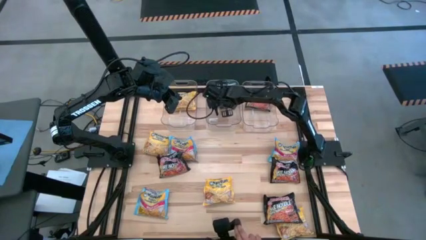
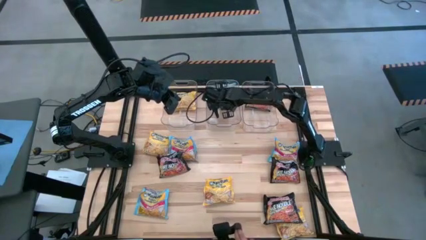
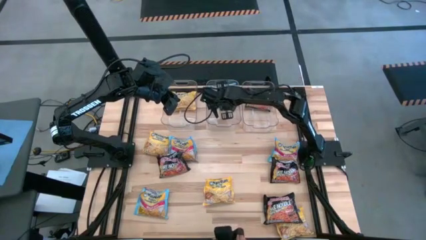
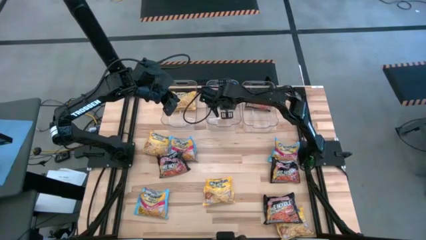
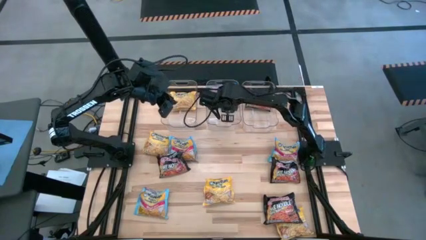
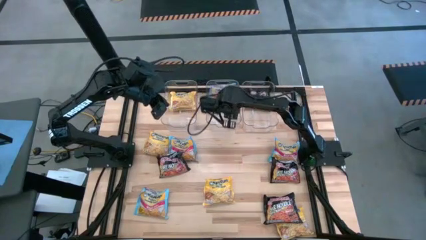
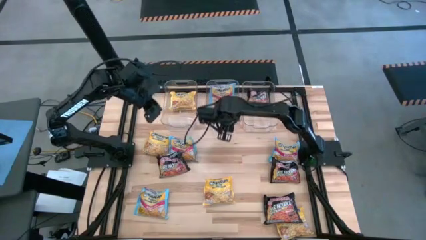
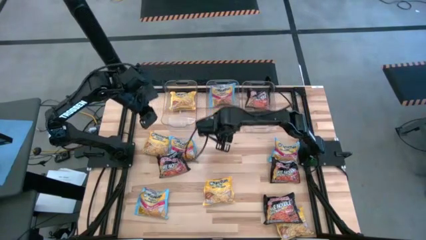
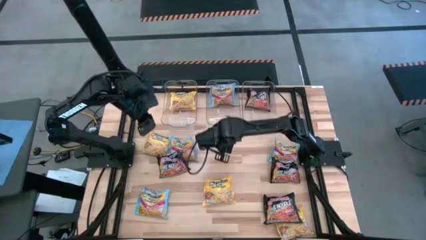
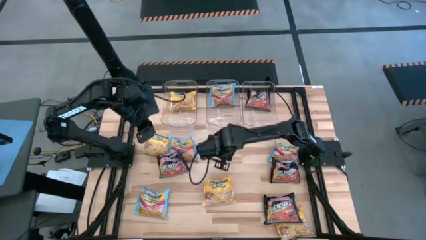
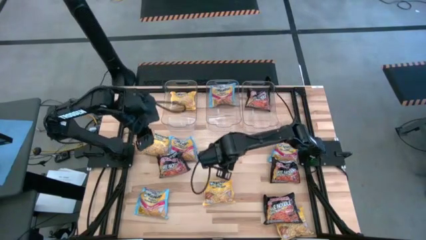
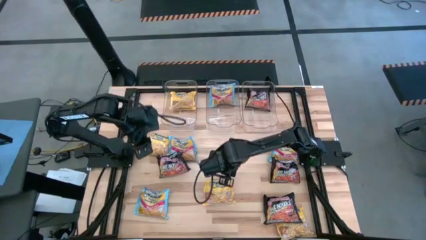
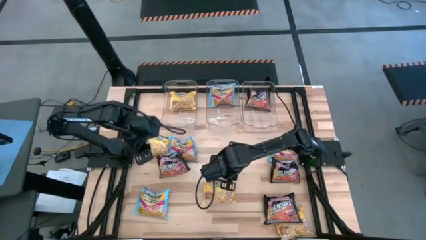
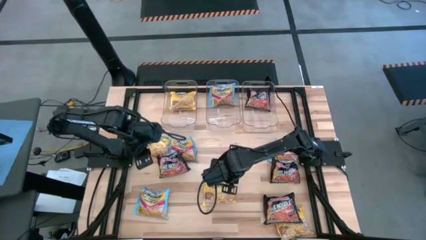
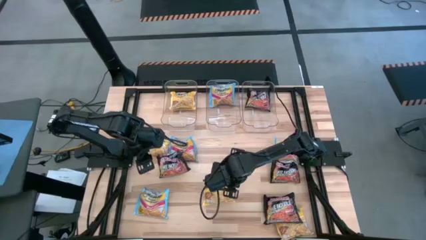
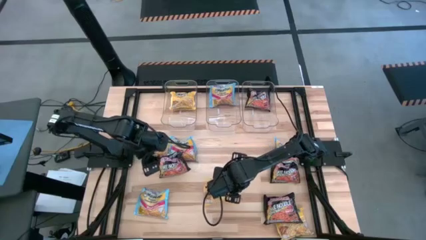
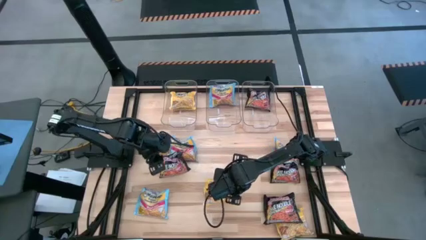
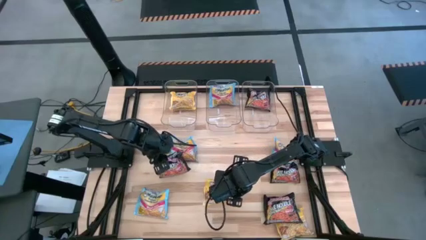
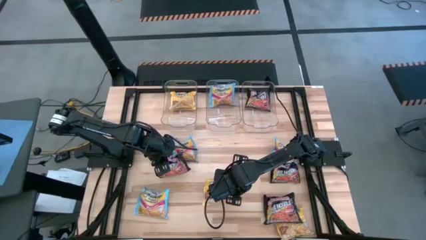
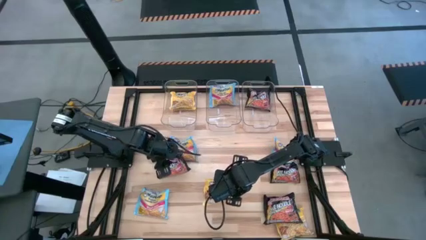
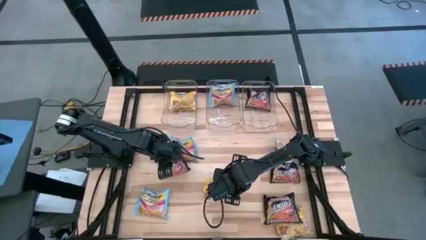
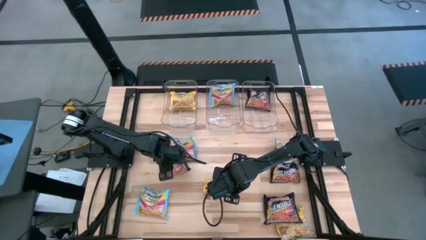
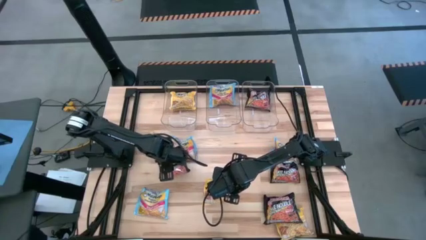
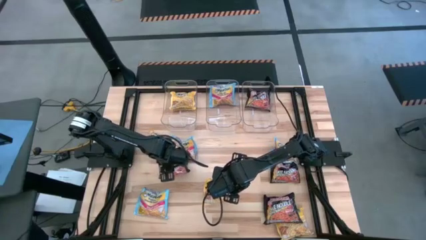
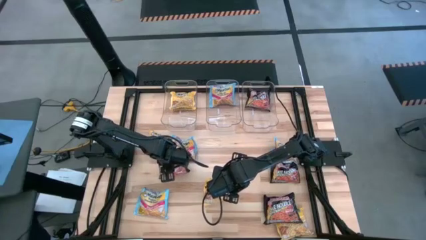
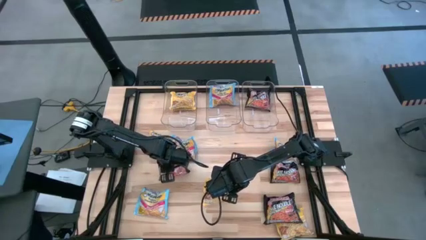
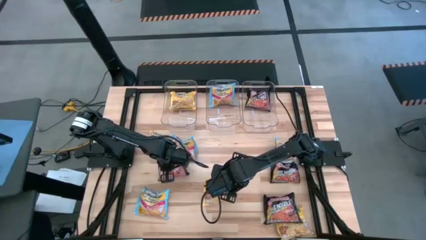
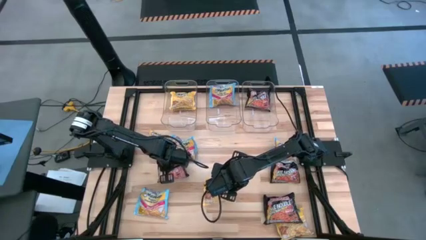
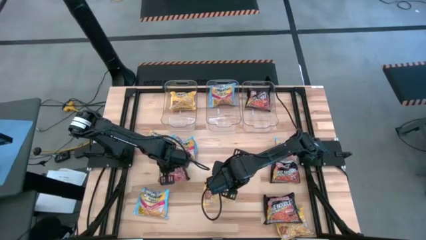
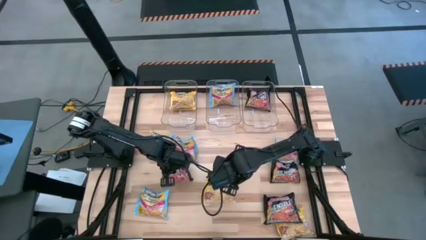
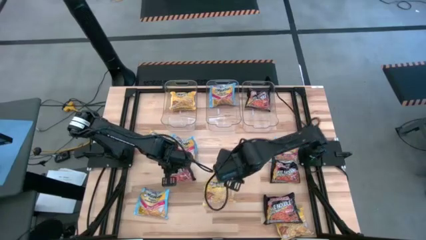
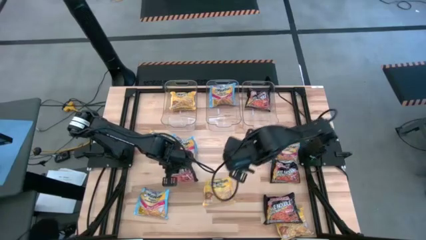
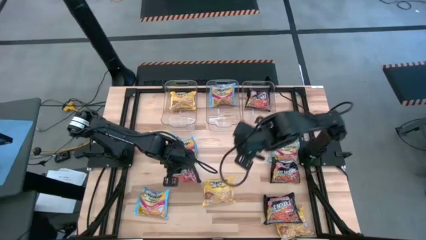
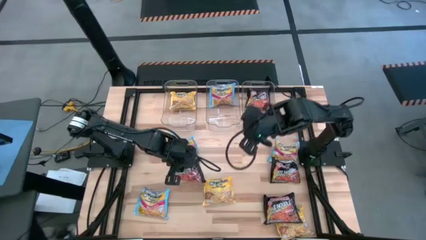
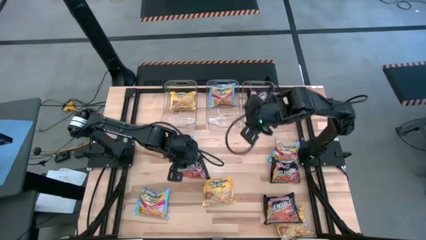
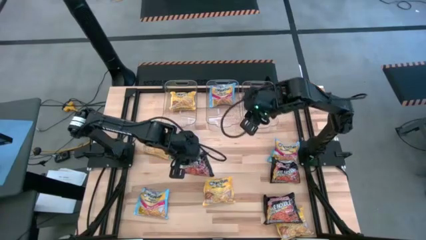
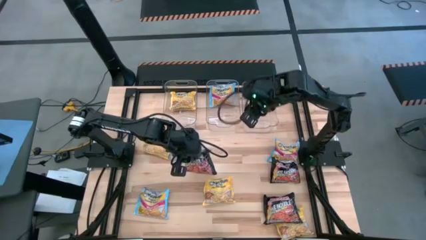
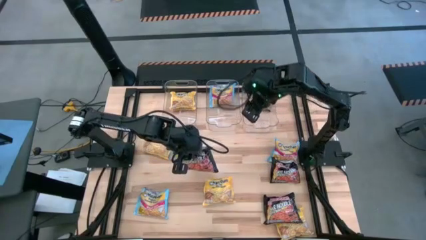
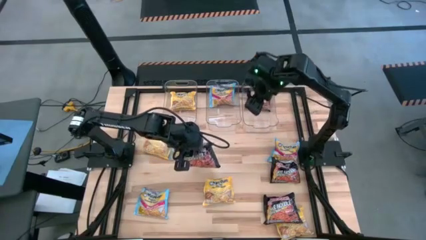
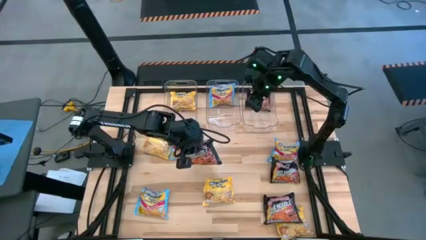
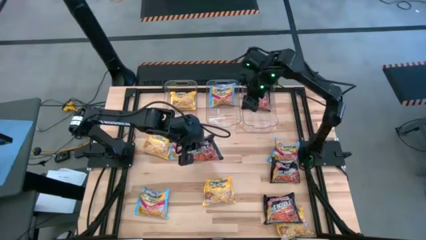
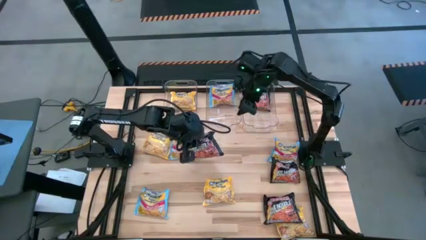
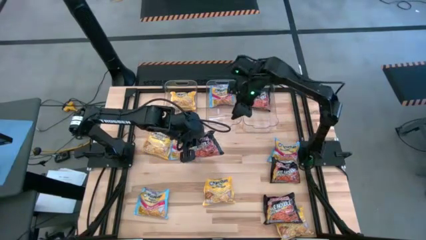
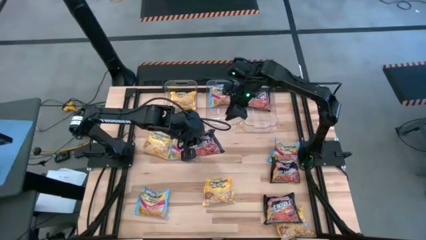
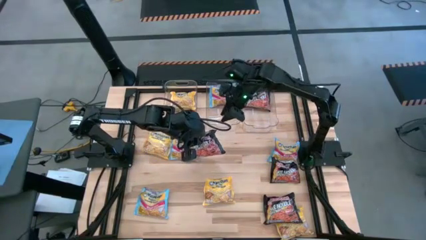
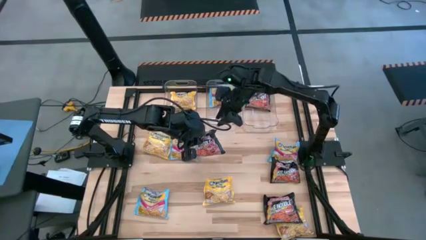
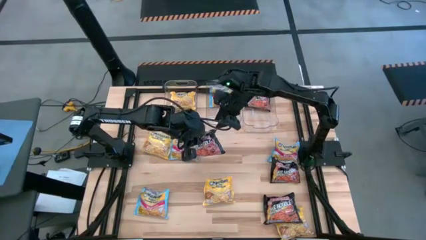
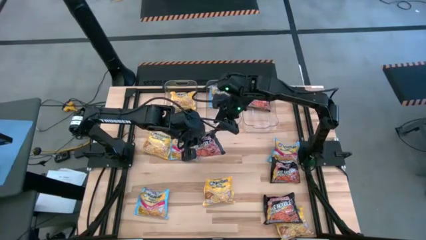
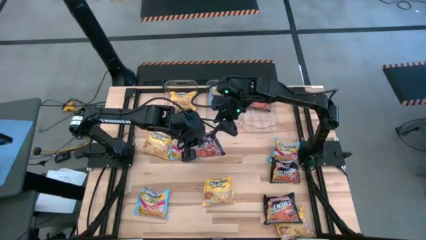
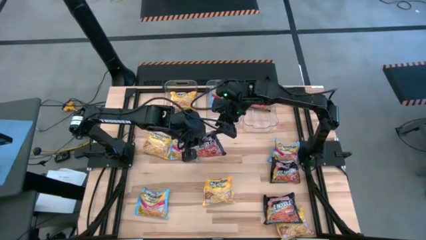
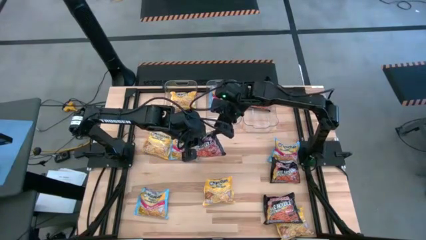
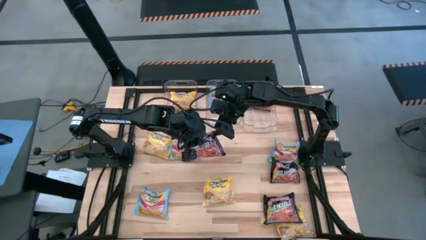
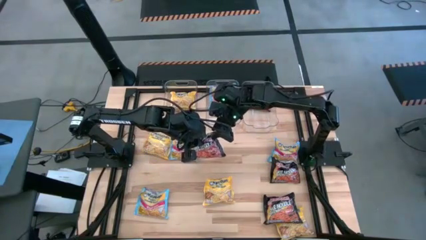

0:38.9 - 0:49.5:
Task: Sort Maruchan noodles
Put the black noodle pack into the right transparent bin
